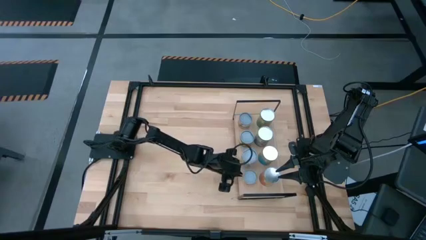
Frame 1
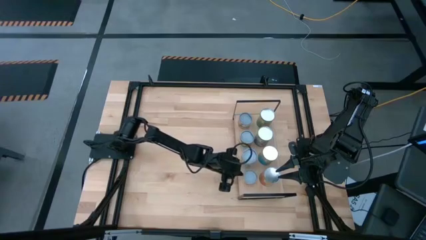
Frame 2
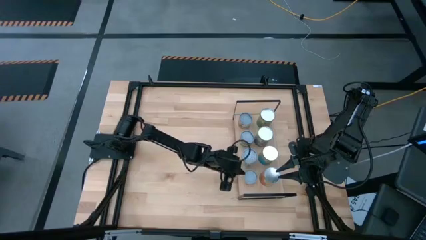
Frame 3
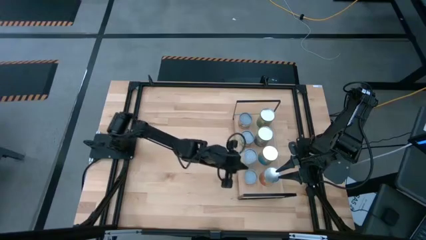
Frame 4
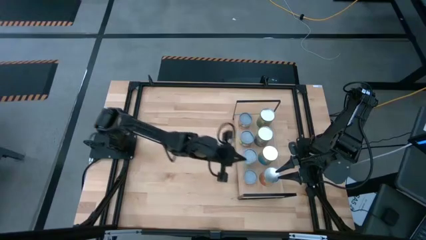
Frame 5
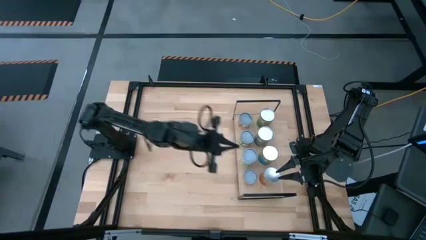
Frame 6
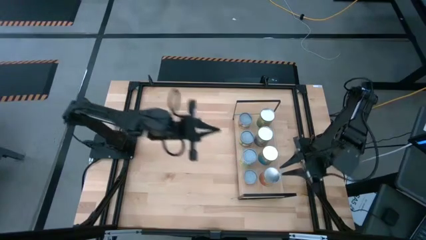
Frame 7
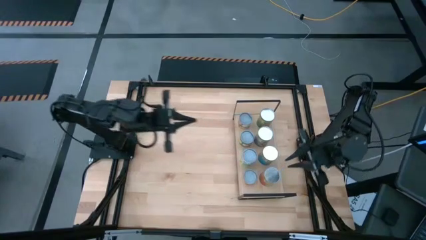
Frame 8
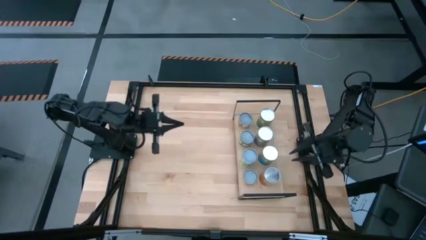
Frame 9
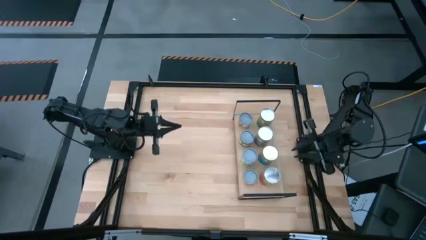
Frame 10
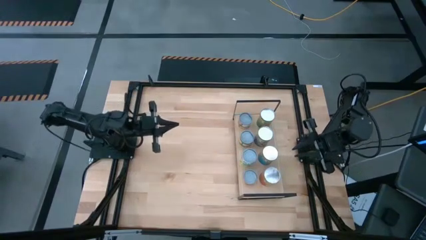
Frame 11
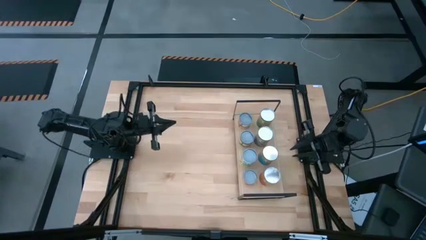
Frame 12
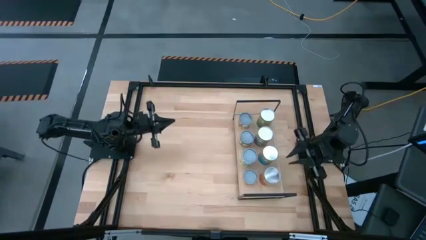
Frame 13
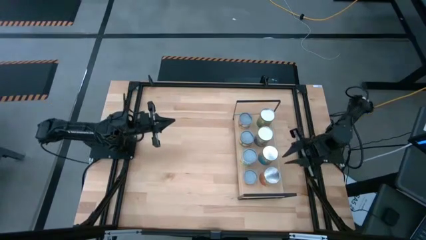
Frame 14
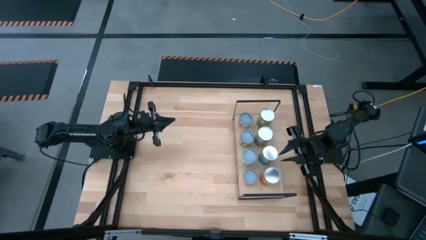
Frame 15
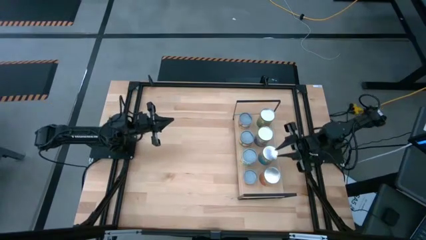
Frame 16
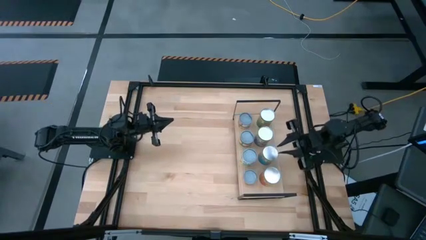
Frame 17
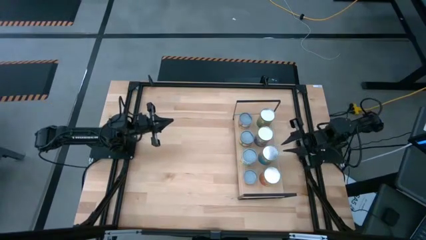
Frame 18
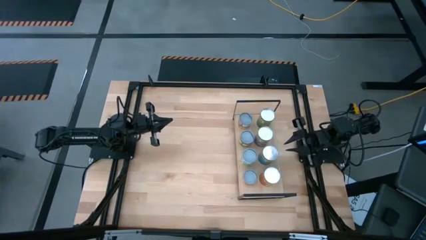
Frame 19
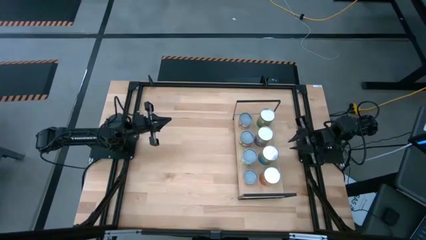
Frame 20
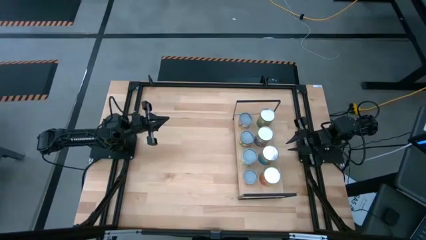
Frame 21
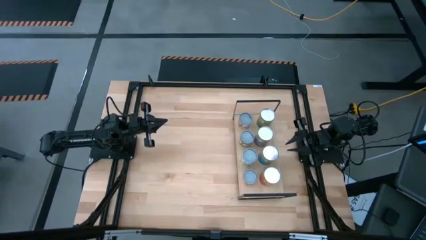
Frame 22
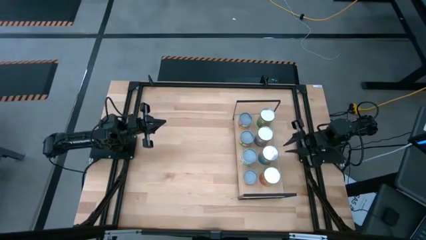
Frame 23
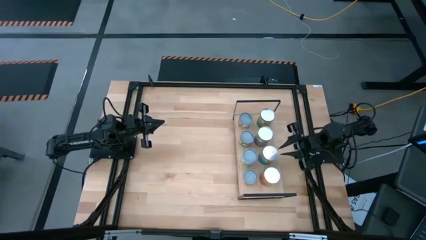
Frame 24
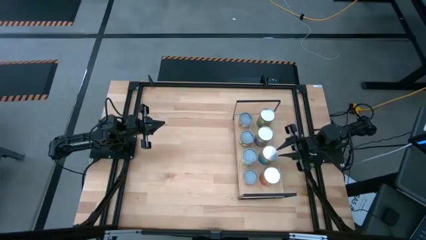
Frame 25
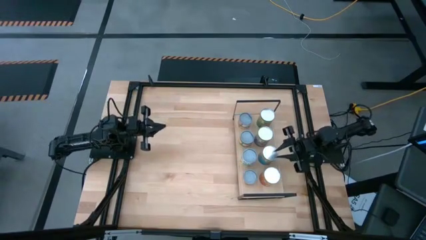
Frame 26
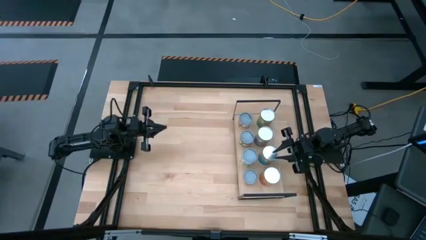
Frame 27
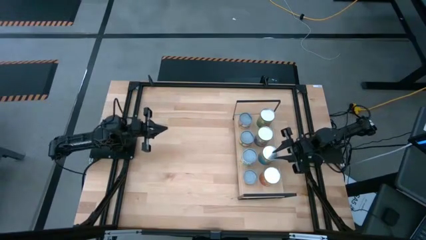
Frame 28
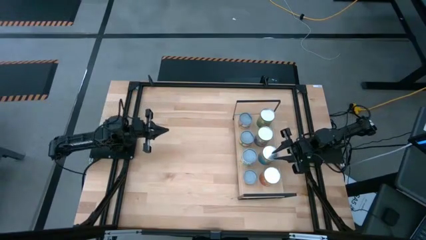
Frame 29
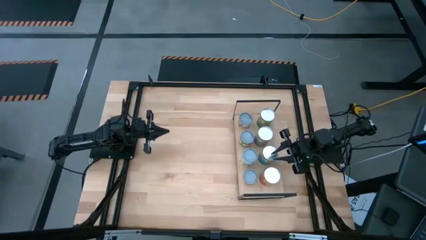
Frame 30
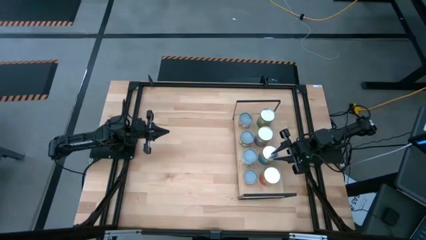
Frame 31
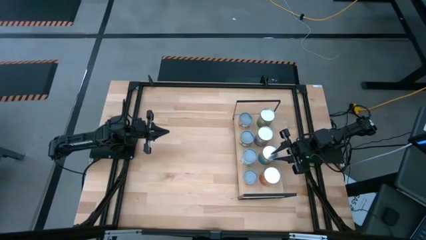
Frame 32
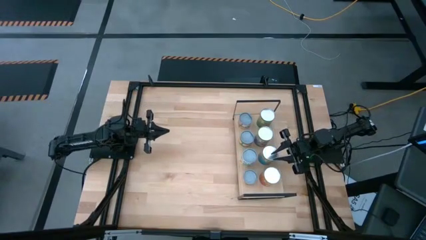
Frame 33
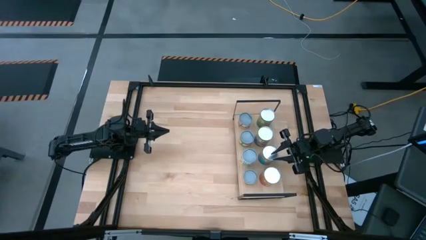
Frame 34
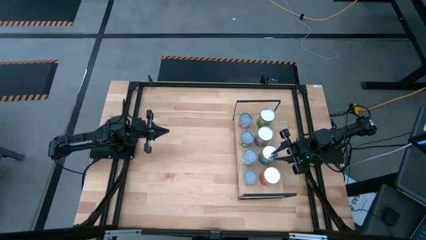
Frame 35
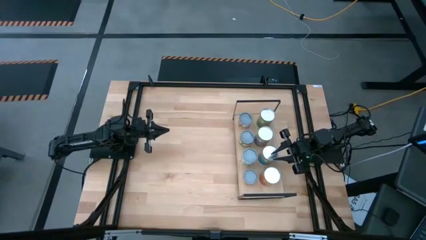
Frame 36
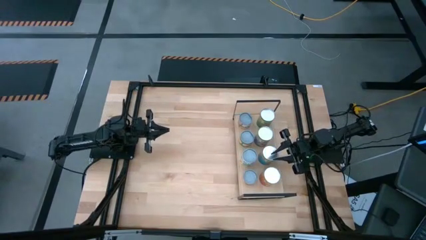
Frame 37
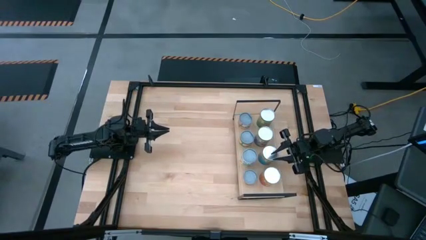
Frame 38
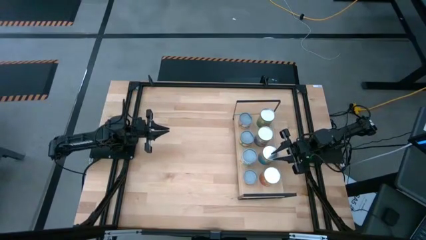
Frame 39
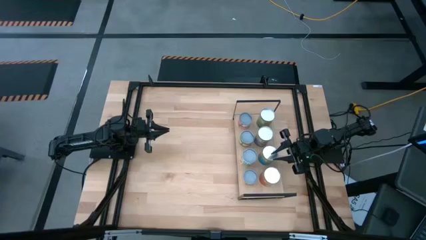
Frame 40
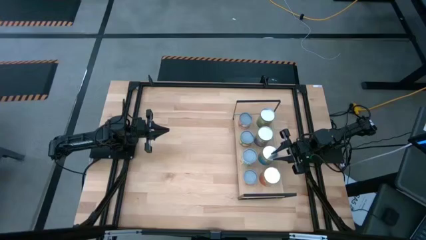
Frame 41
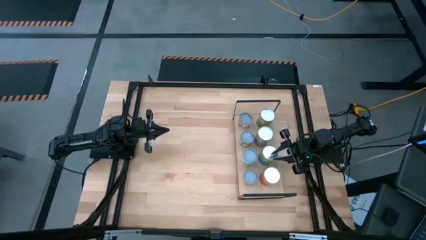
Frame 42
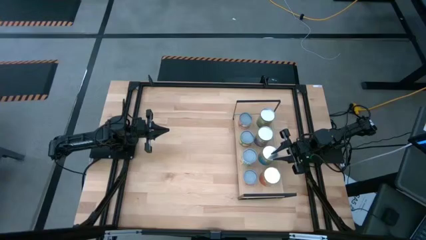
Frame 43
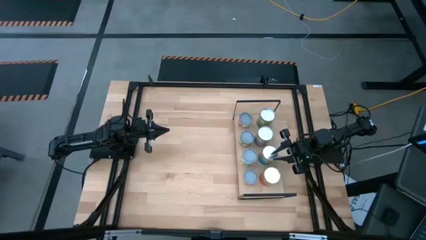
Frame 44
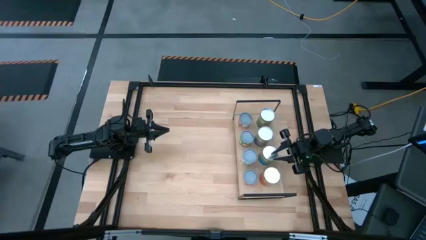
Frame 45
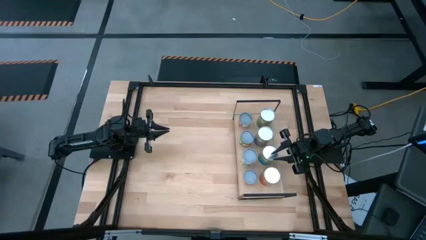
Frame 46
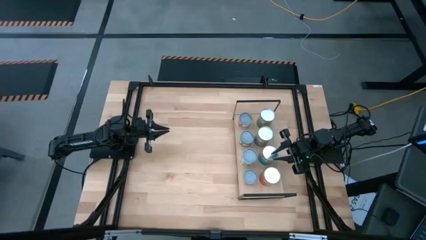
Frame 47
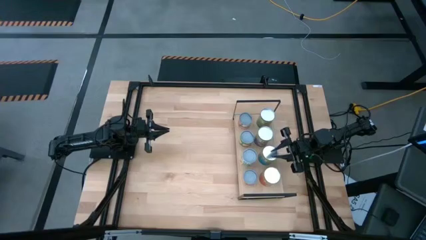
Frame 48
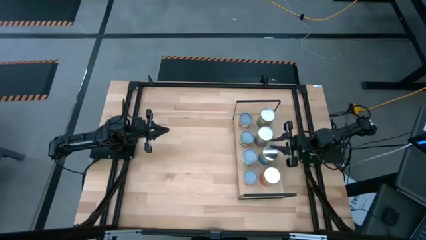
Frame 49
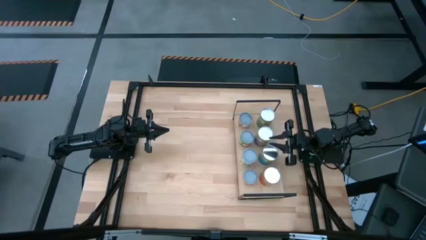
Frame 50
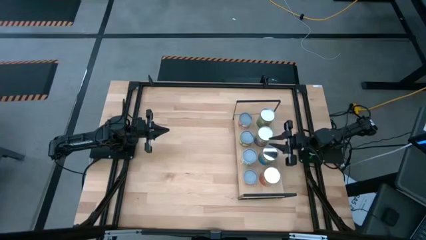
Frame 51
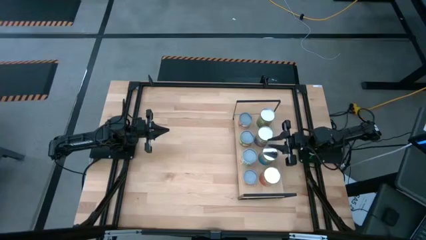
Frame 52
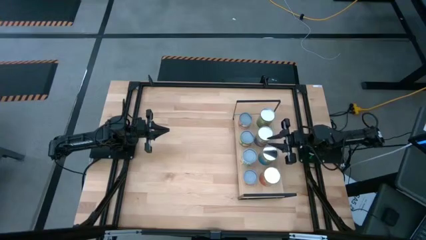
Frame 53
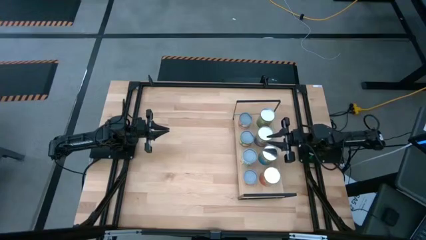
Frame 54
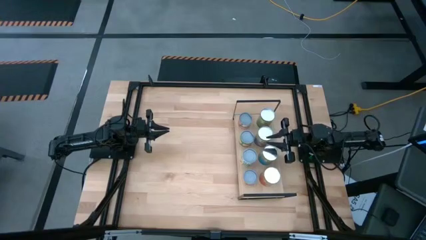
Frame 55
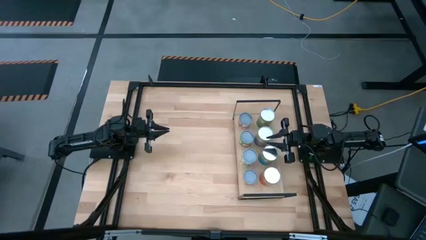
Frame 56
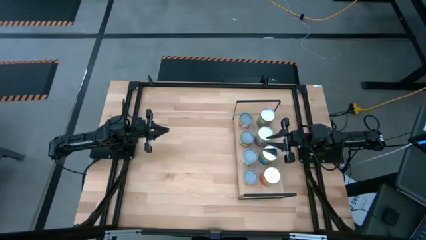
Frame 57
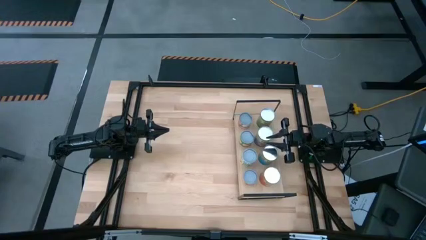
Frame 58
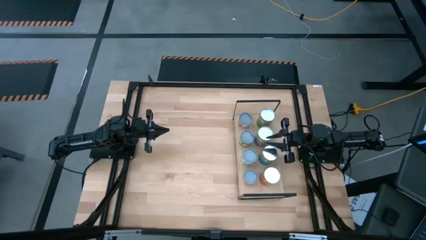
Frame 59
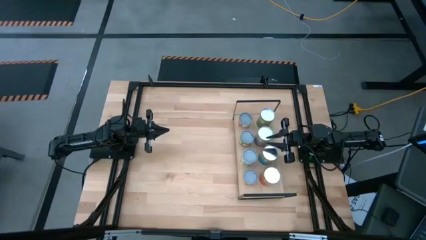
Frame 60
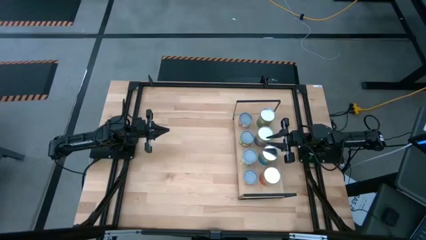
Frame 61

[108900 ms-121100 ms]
Task: Pick and place cans onto a shelf
Return to Home Position
